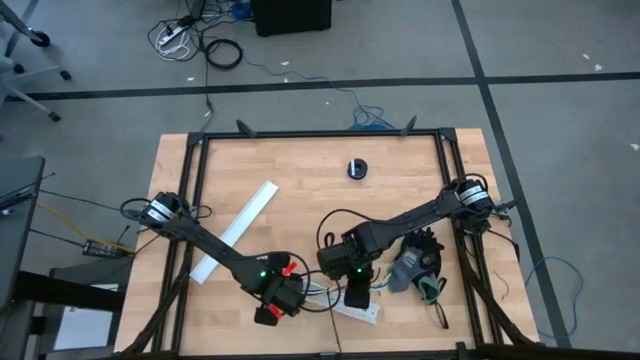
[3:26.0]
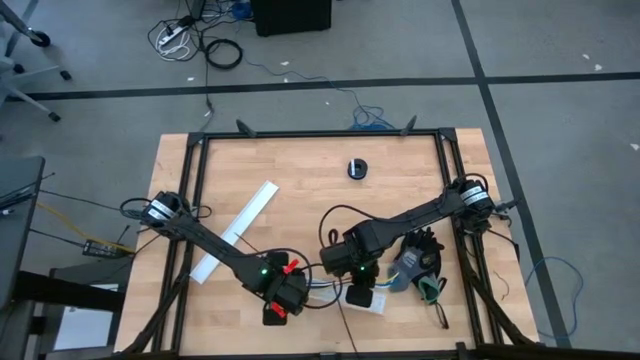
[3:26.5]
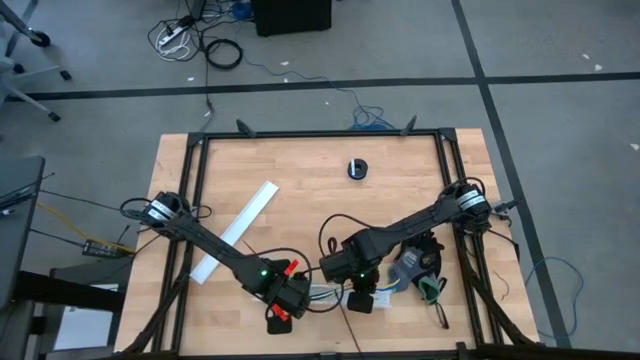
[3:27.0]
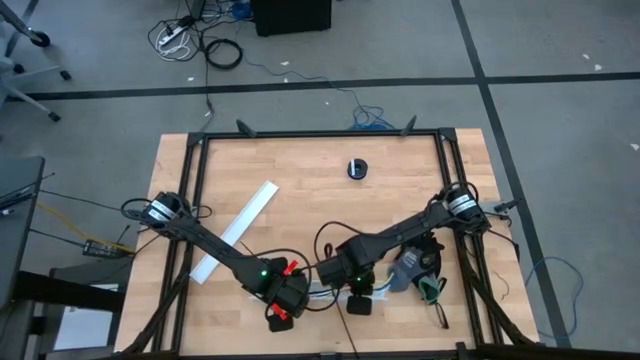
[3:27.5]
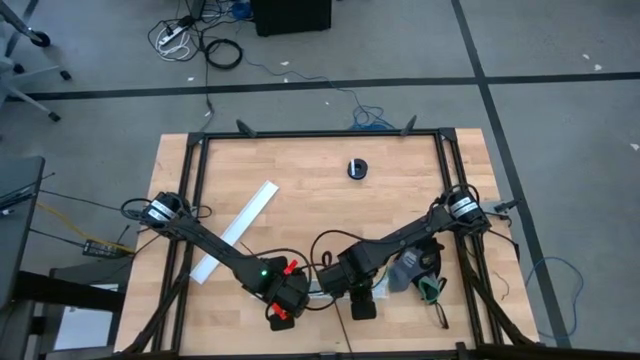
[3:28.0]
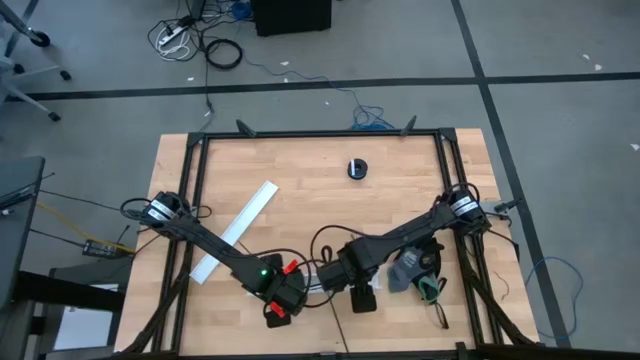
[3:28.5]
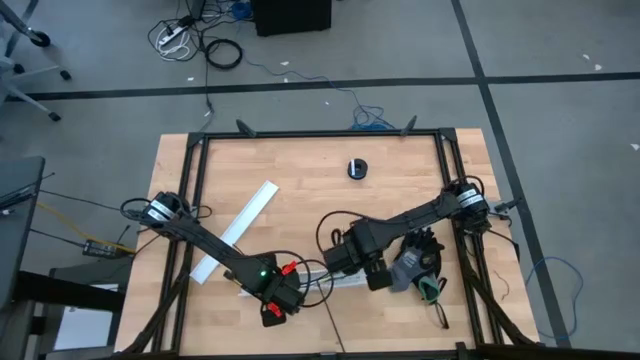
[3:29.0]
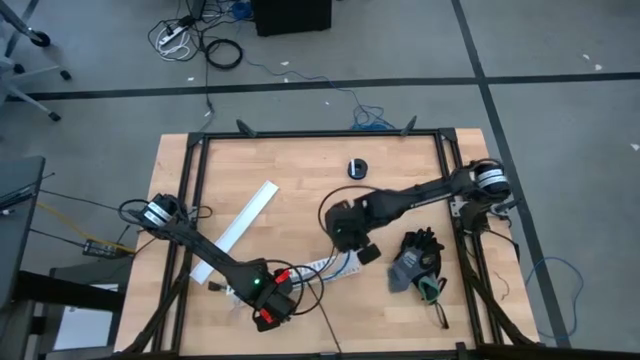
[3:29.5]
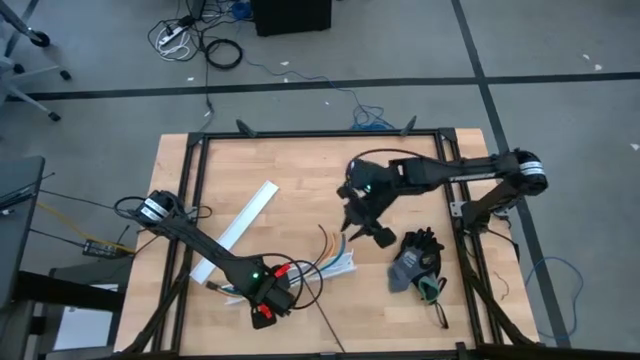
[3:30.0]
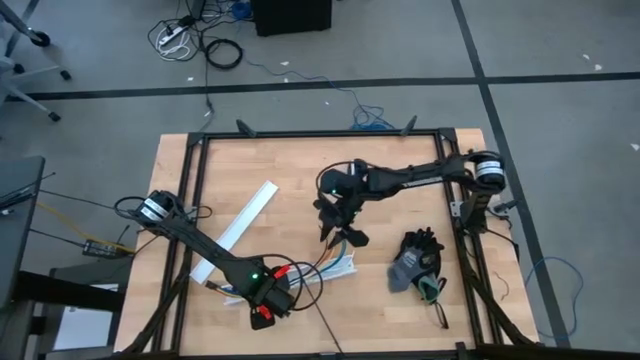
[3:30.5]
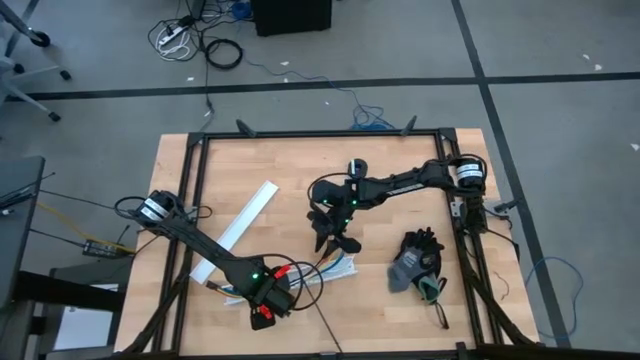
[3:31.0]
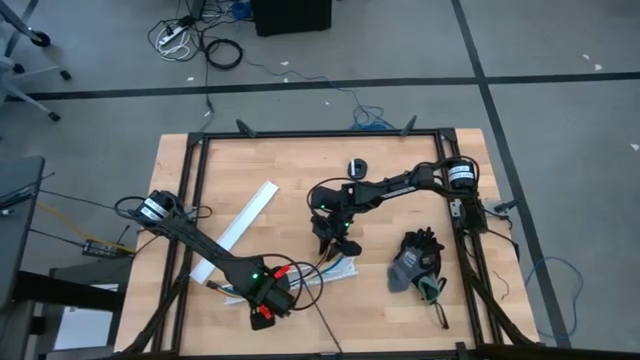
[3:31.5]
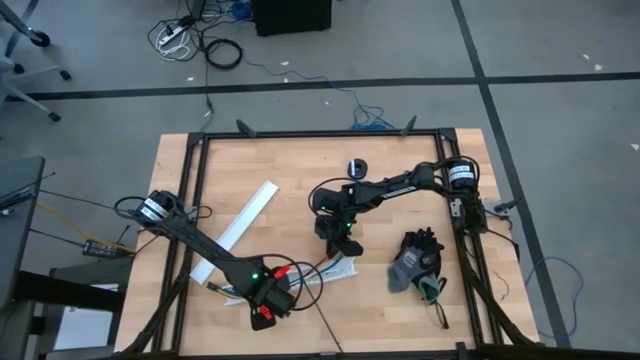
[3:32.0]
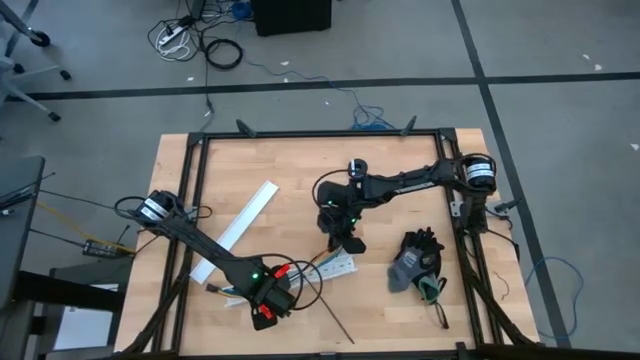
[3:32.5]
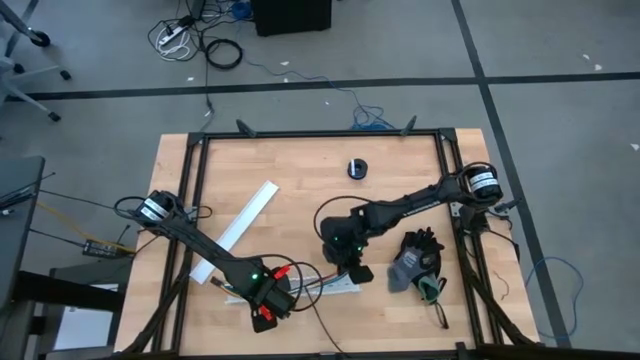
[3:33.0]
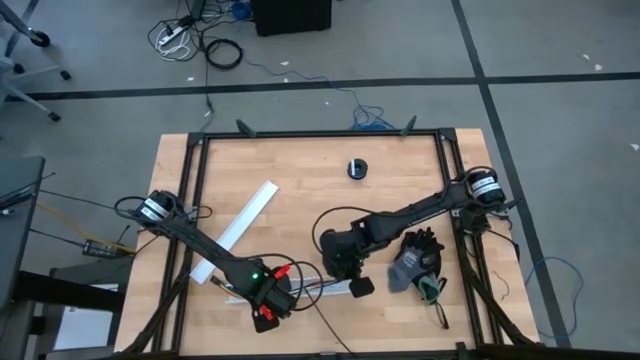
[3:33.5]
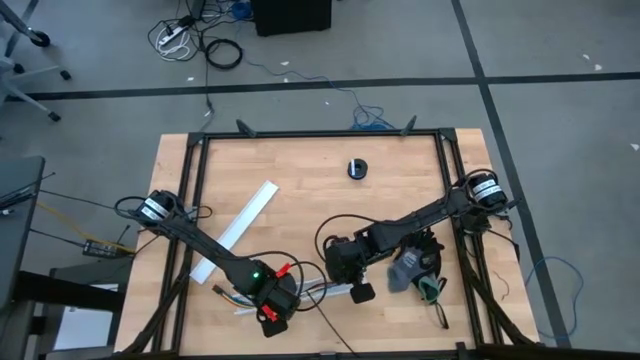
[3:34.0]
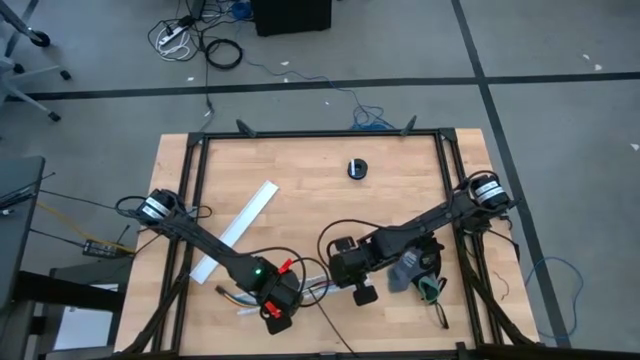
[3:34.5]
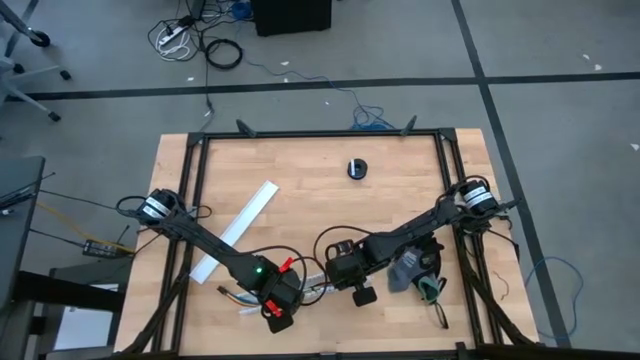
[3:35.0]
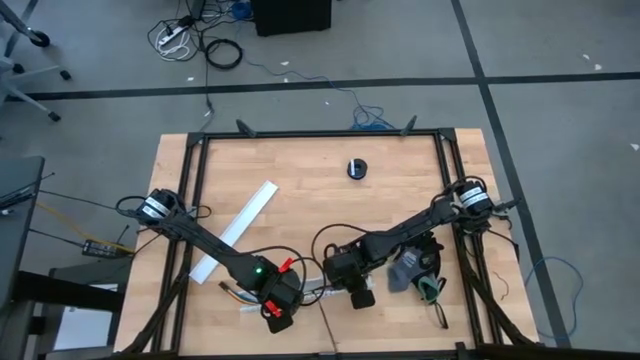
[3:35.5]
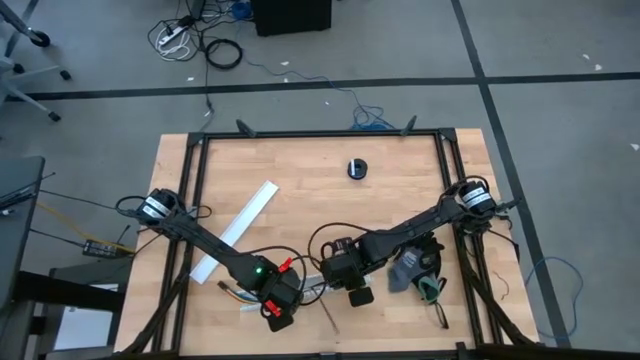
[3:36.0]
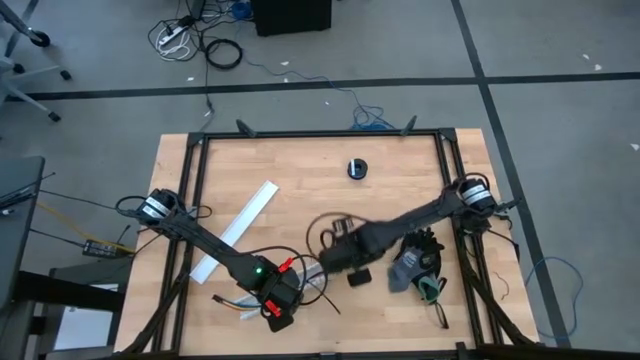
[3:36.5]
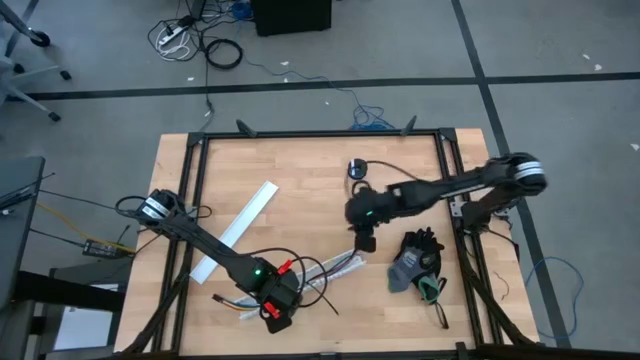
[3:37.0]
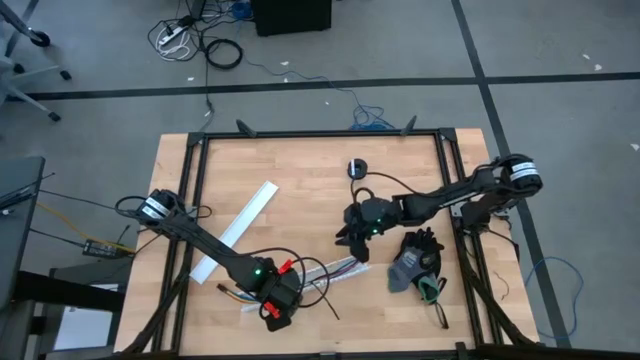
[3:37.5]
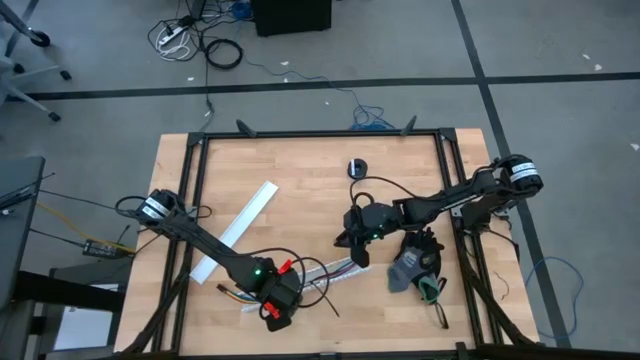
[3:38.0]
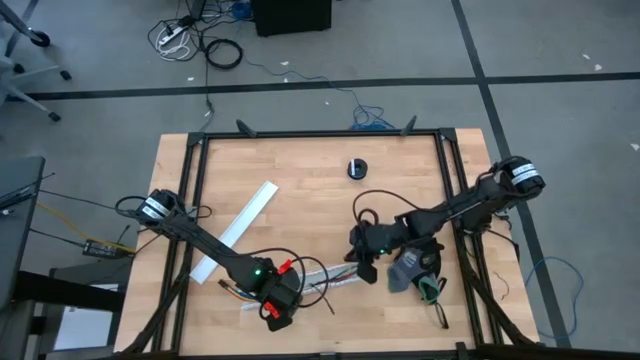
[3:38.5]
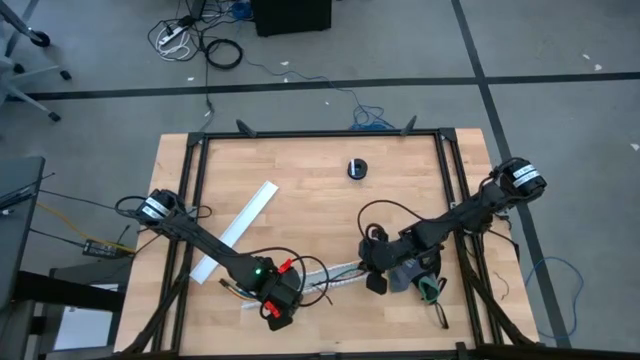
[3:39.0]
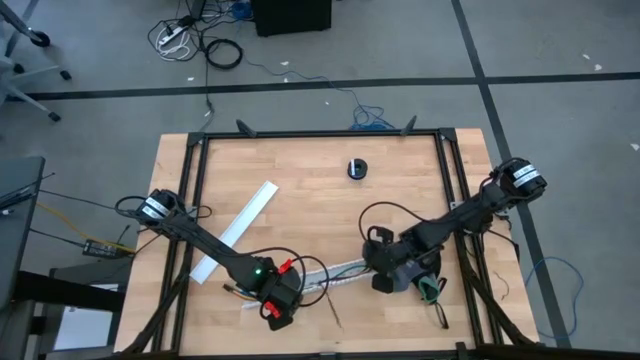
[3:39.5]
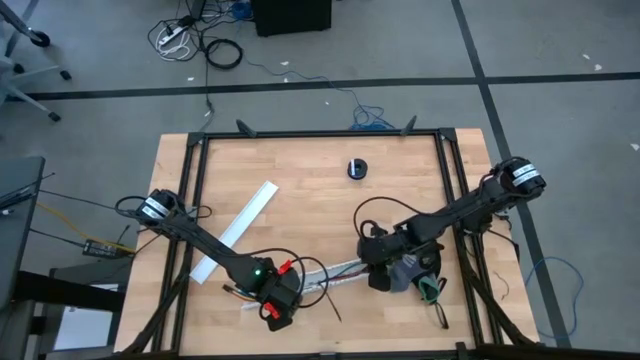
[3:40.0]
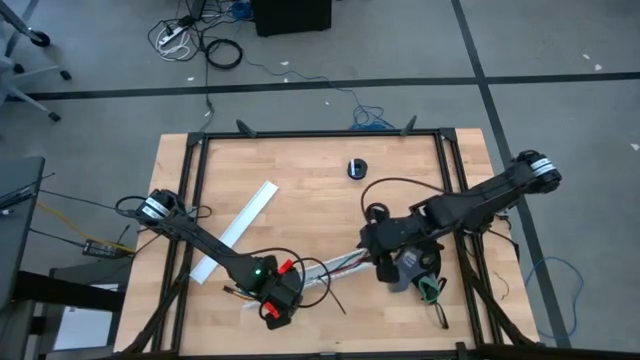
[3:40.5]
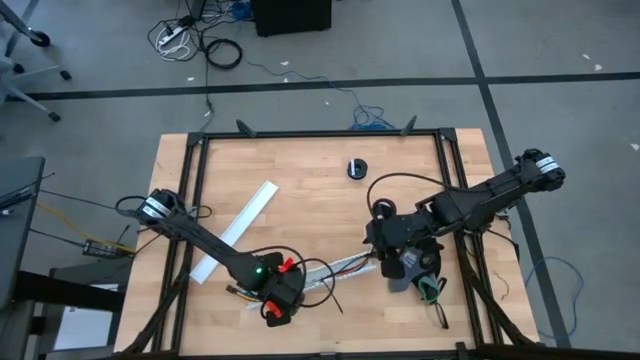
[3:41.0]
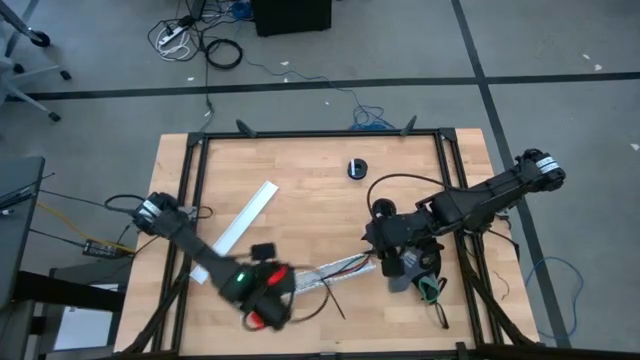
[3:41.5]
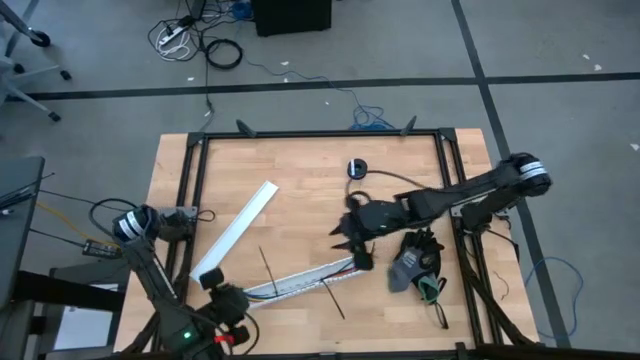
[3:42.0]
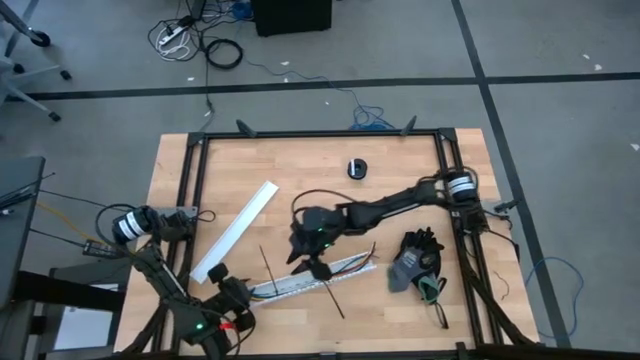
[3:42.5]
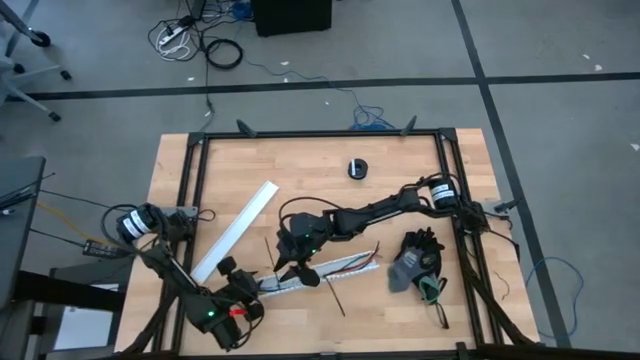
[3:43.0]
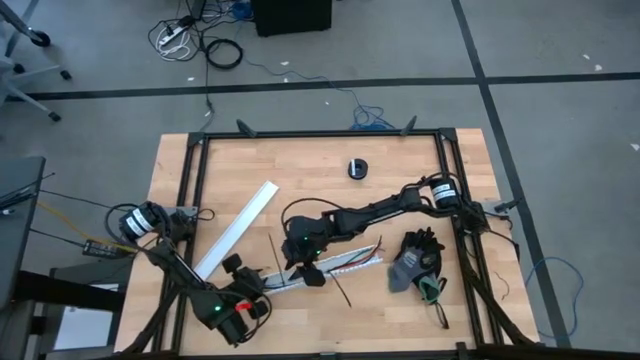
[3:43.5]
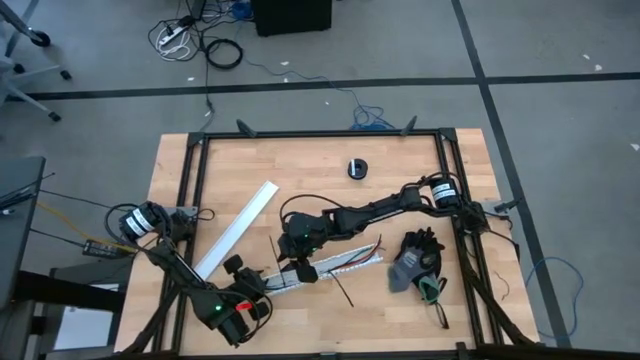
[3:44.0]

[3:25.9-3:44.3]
Task: Ziptie cables
Put the cable wires in the white cable duct
